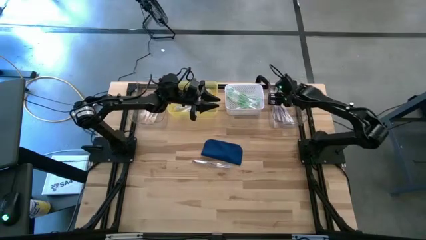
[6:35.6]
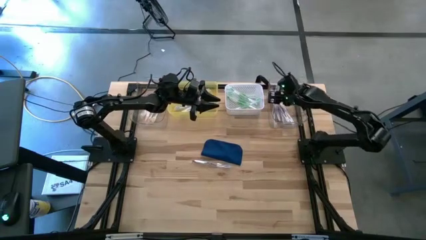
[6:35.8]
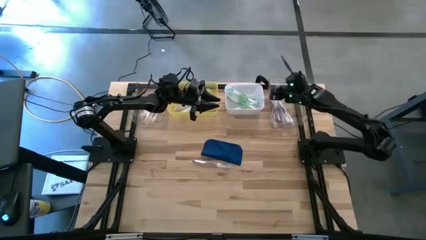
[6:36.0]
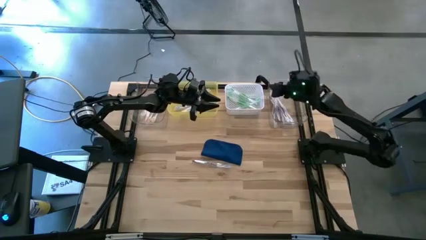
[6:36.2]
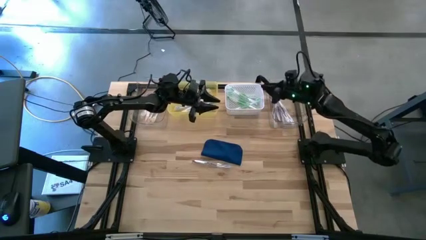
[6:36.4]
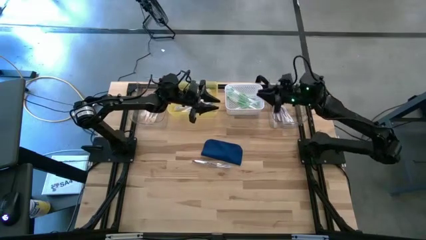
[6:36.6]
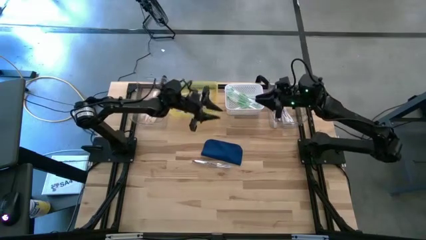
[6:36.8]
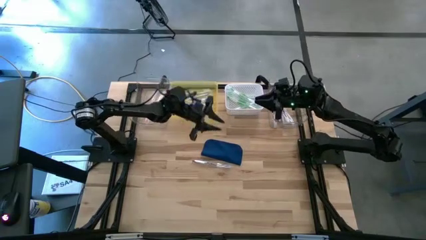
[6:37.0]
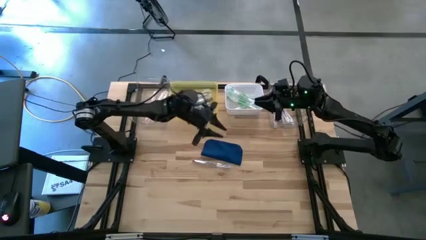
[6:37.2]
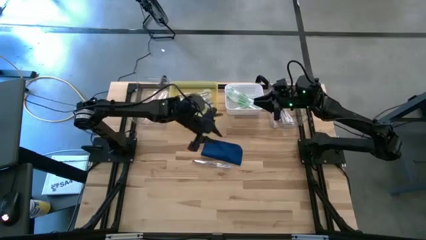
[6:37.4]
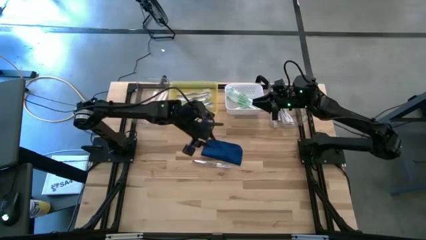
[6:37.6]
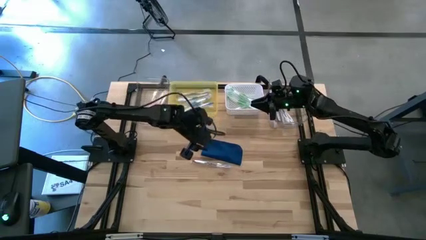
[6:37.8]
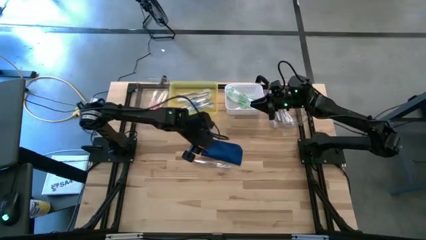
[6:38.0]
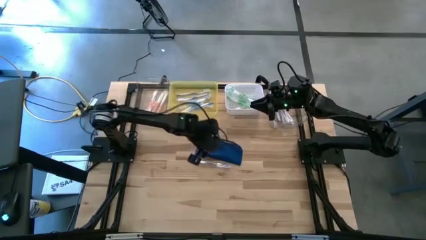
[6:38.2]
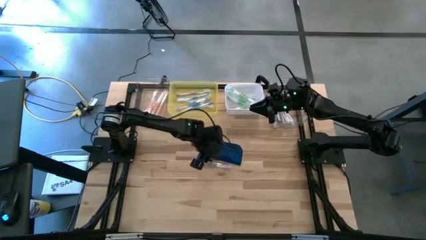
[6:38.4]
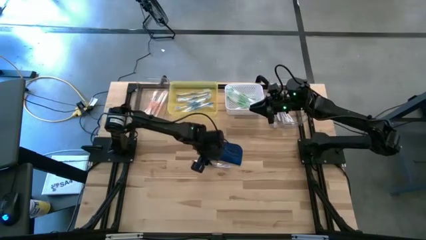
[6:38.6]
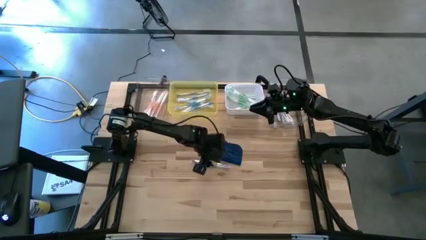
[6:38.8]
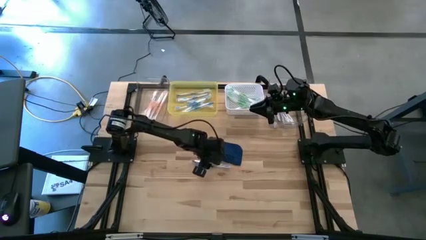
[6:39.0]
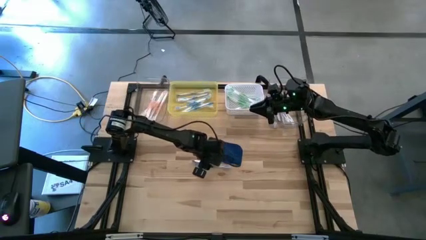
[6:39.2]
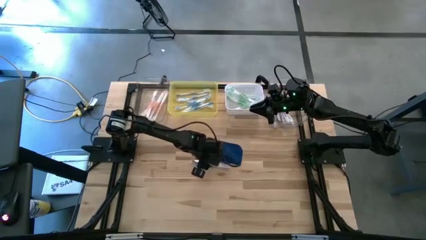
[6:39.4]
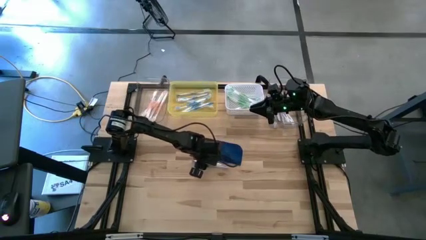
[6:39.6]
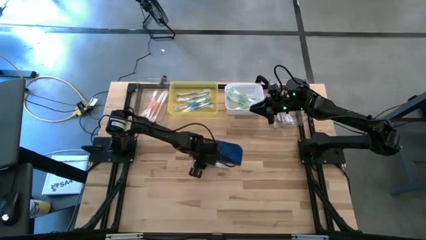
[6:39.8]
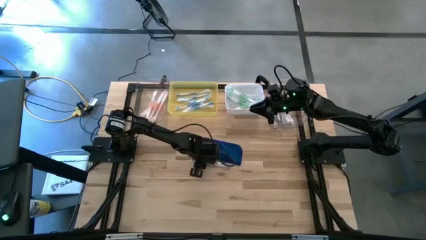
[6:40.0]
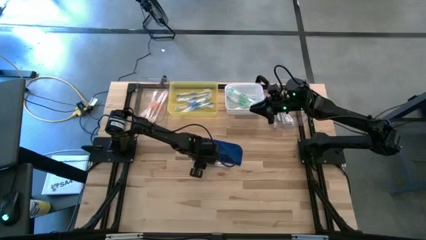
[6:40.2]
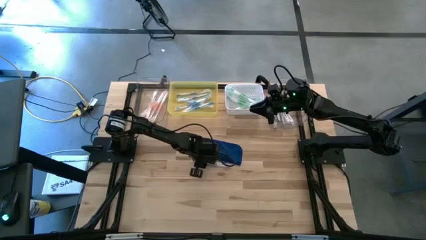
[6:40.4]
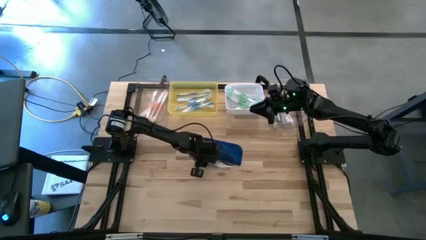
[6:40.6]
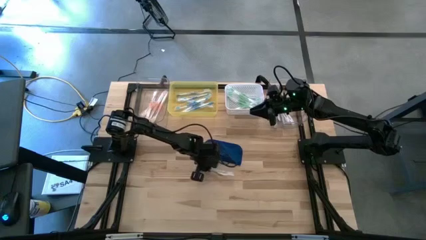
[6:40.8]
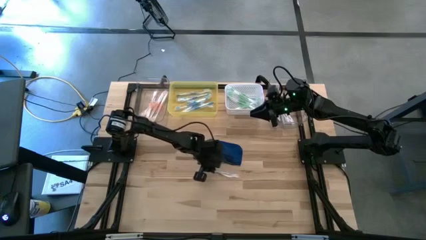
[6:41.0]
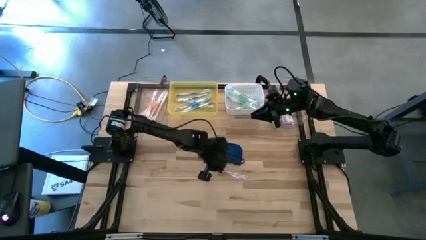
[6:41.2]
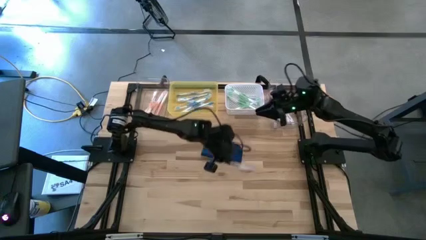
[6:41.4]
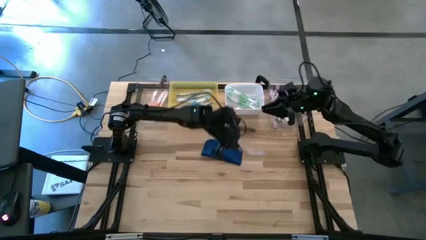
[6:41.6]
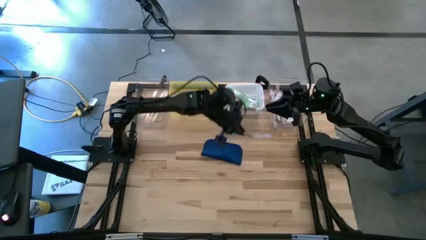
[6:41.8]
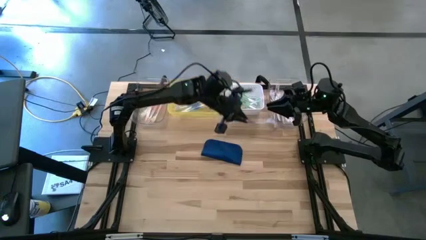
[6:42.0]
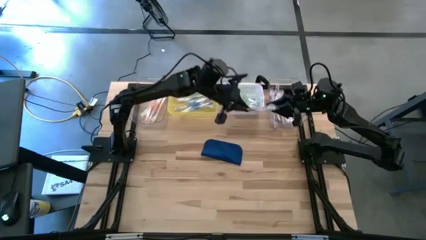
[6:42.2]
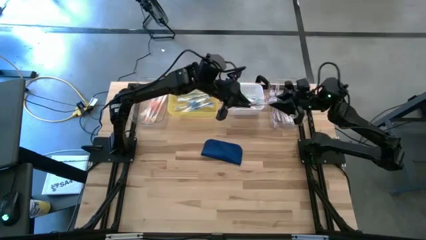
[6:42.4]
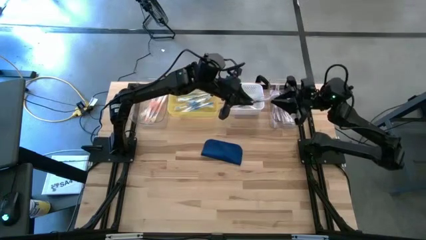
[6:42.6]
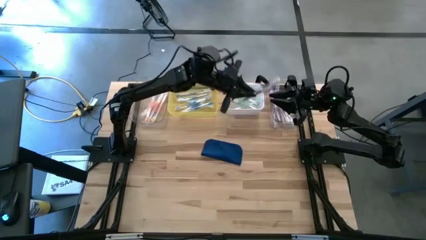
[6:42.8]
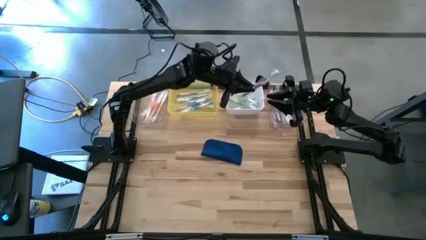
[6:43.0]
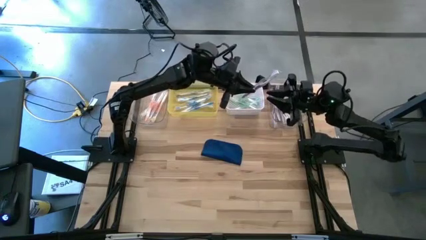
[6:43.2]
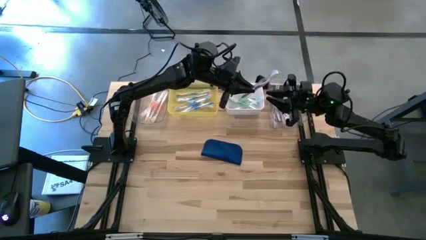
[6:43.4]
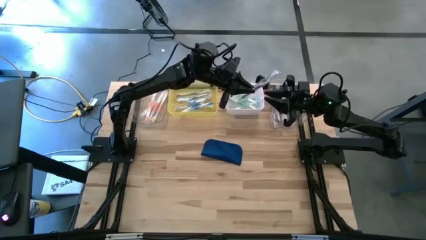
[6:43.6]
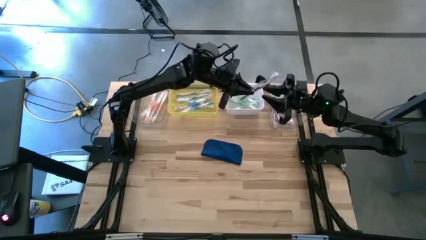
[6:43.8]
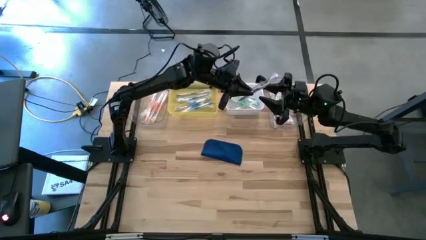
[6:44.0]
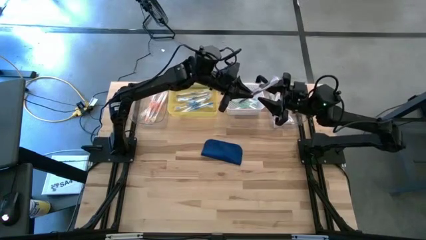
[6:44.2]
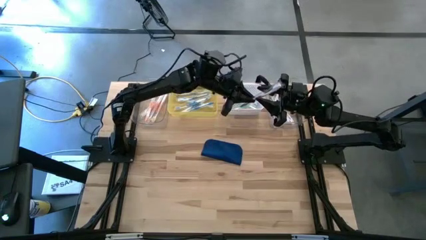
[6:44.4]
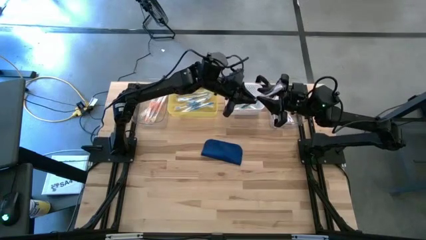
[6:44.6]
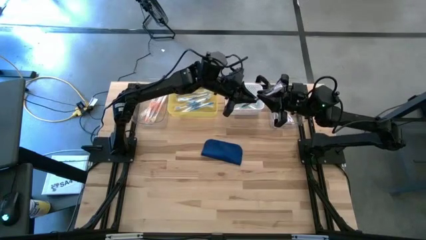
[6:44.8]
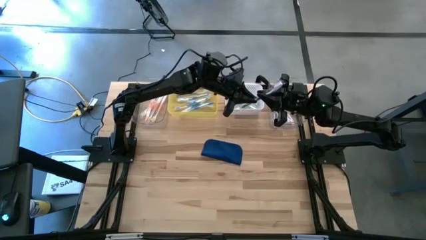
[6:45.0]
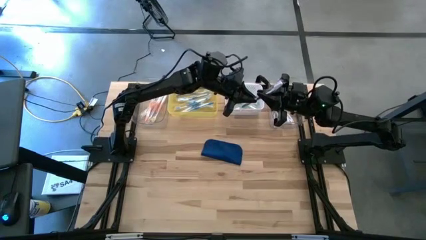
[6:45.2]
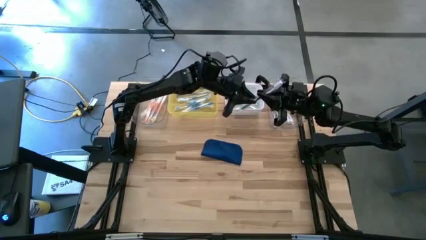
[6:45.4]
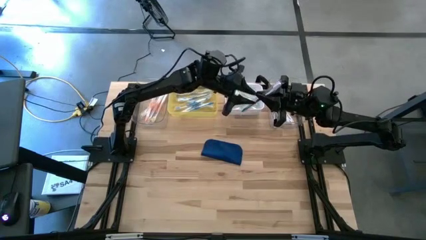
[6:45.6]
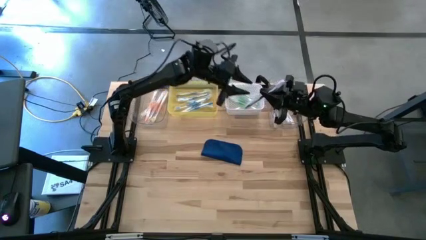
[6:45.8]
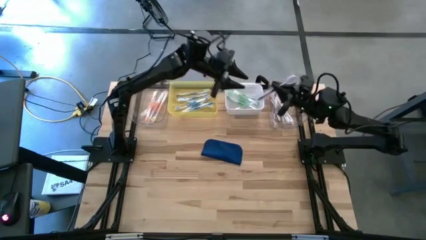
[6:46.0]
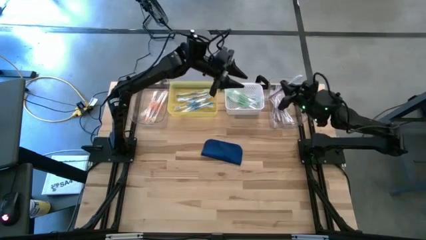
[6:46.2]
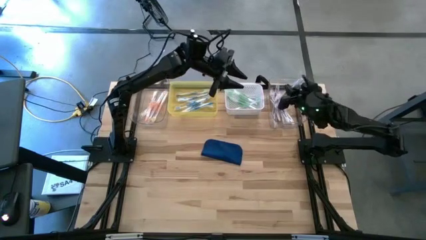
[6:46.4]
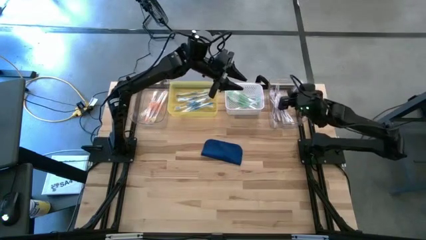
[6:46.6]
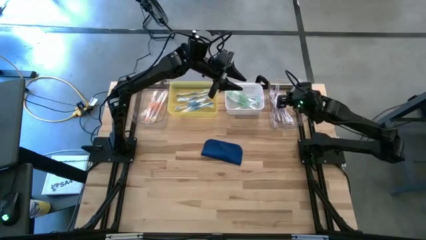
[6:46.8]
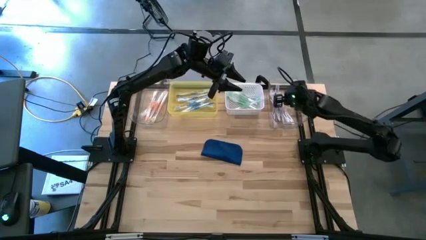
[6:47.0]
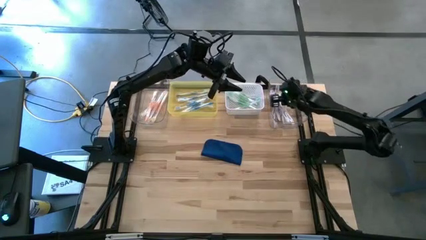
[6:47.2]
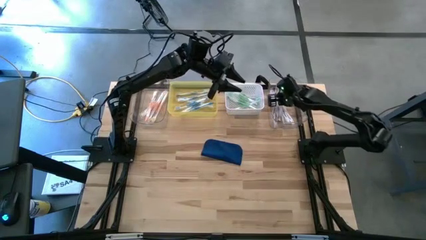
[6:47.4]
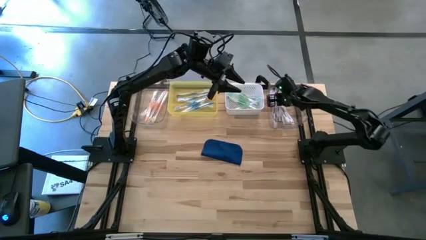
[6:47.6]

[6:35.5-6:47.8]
Task: Pick & Place Toothbrushes
Put the violet toothbrush into the right transparent bin

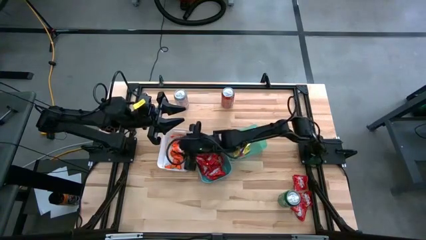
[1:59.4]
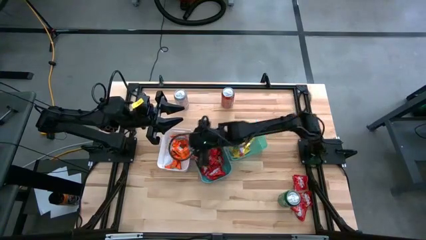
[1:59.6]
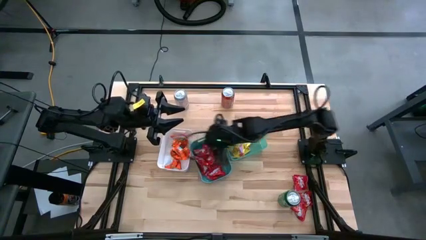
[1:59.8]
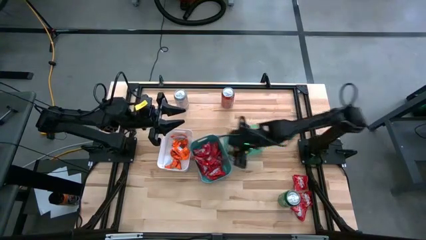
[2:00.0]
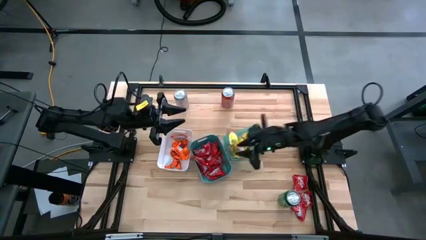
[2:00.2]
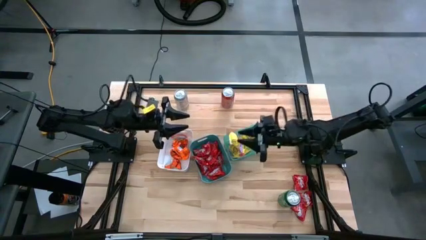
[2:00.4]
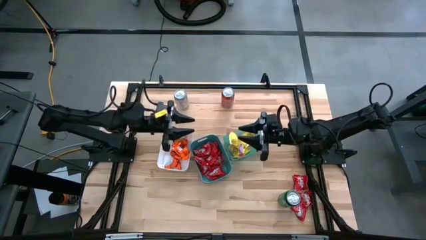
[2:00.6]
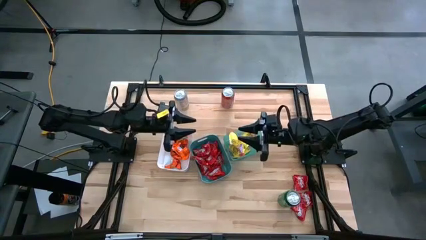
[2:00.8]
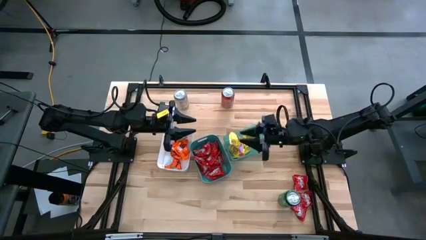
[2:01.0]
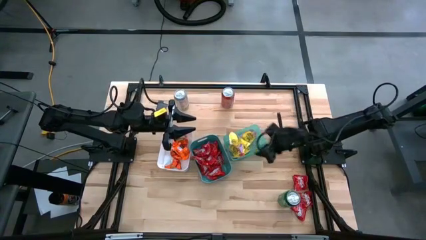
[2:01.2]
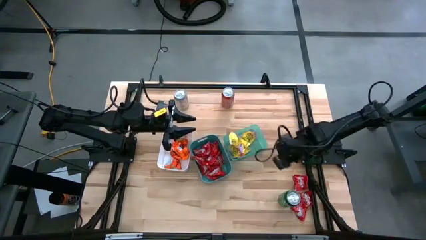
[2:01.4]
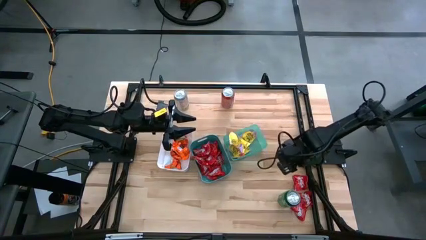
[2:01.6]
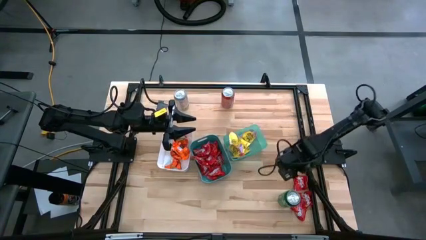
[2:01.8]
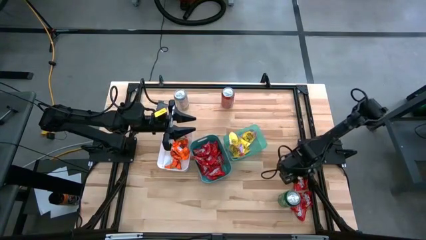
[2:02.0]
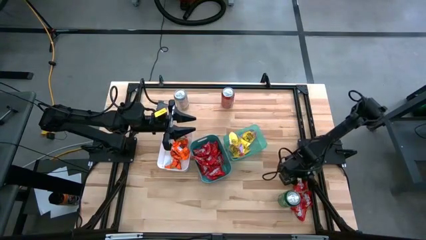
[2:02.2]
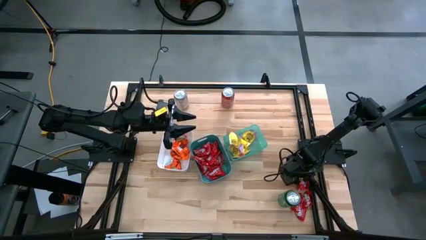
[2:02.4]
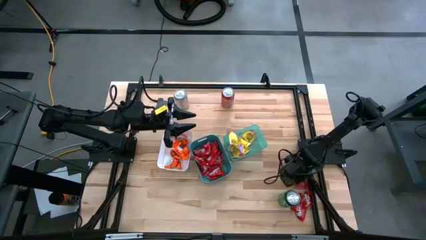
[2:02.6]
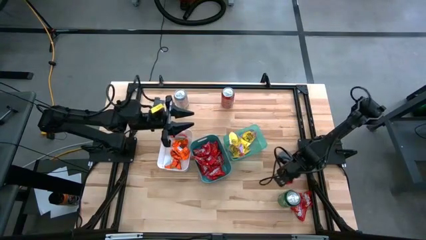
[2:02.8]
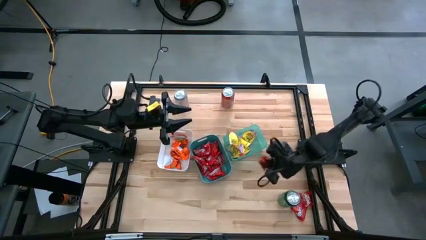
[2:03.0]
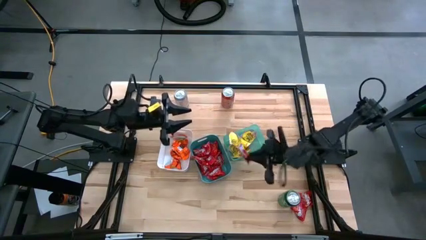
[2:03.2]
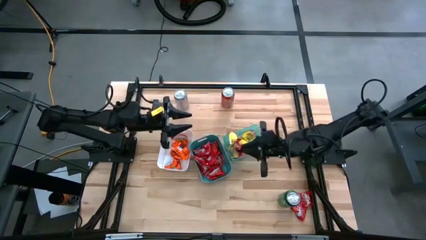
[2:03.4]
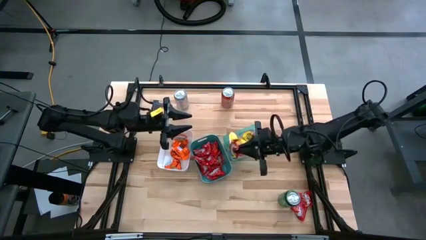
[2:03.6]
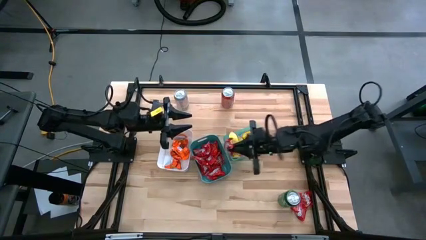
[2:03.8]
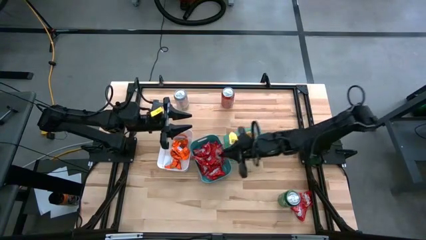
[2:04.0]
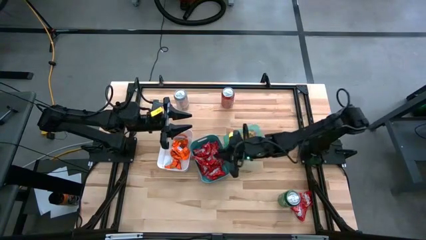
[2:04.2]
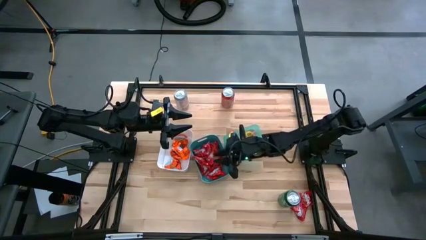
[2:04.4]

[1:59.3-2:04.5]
Task: Sort candy
Put the red candy into the green bin
